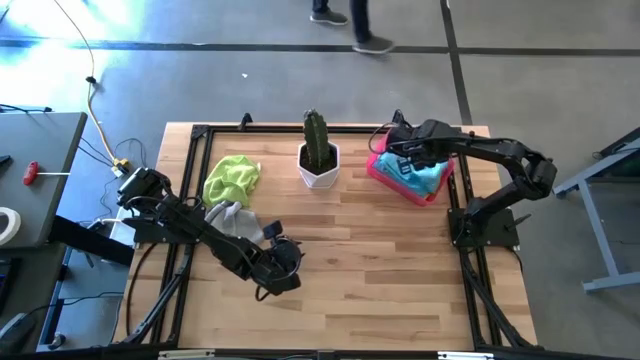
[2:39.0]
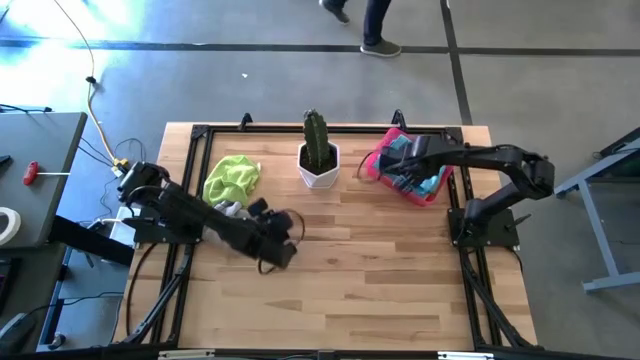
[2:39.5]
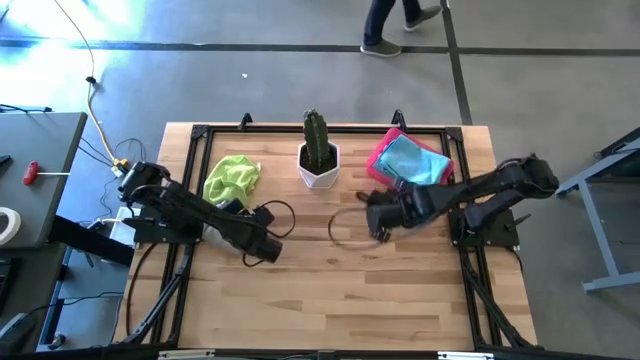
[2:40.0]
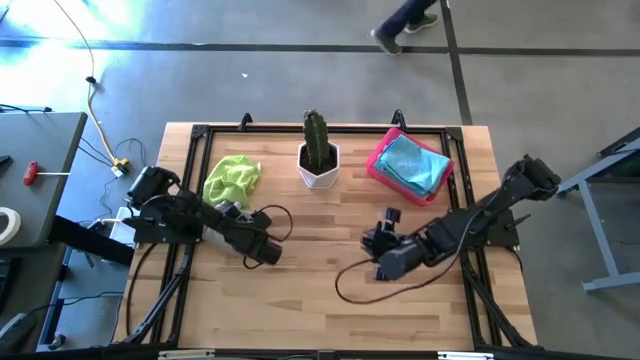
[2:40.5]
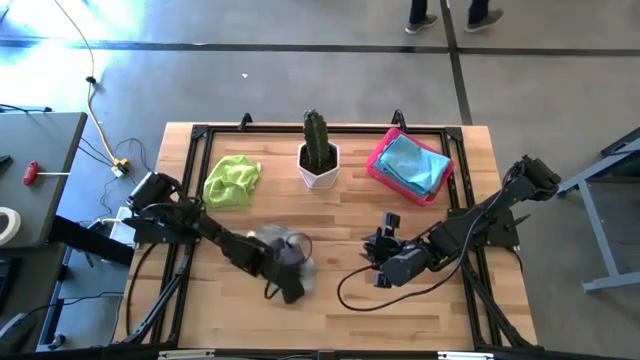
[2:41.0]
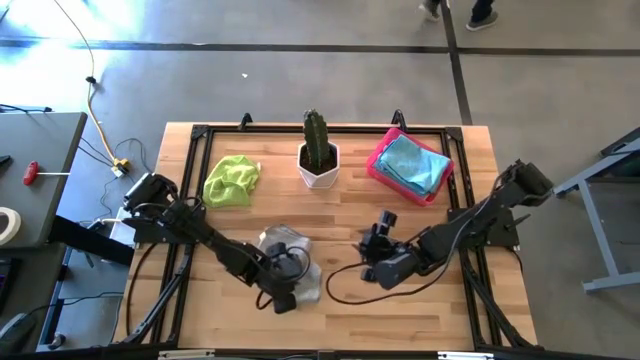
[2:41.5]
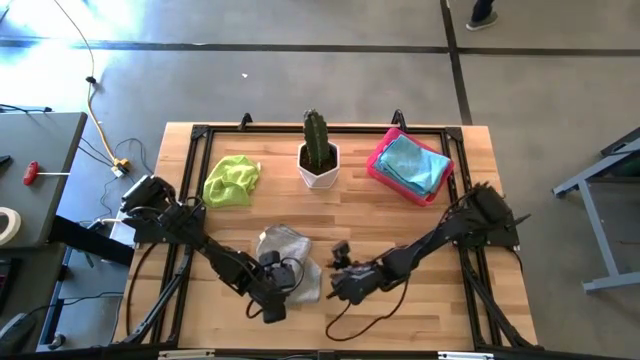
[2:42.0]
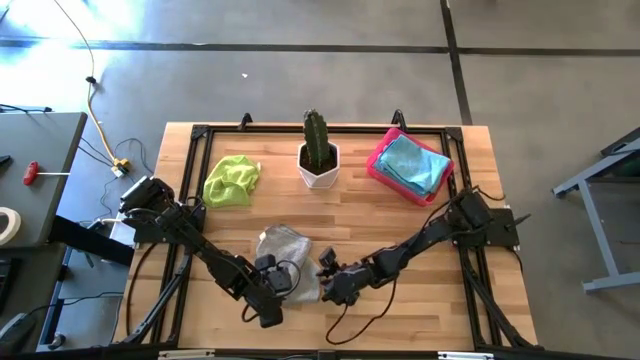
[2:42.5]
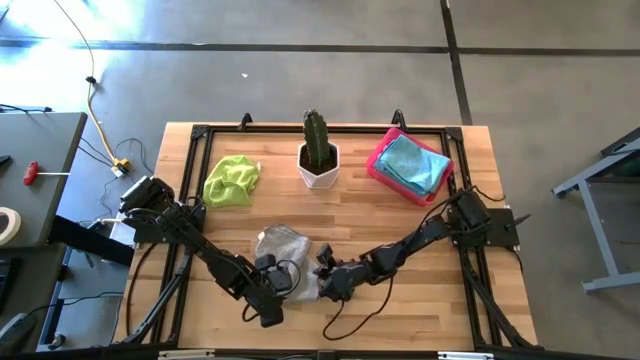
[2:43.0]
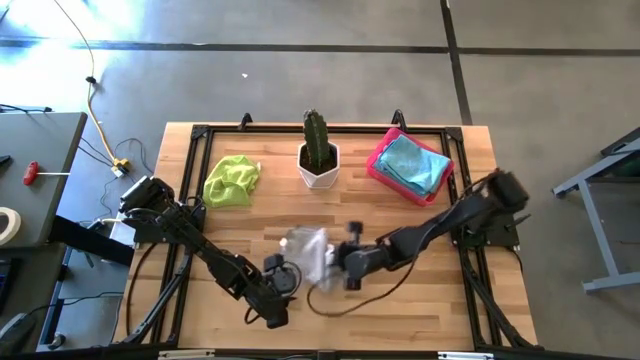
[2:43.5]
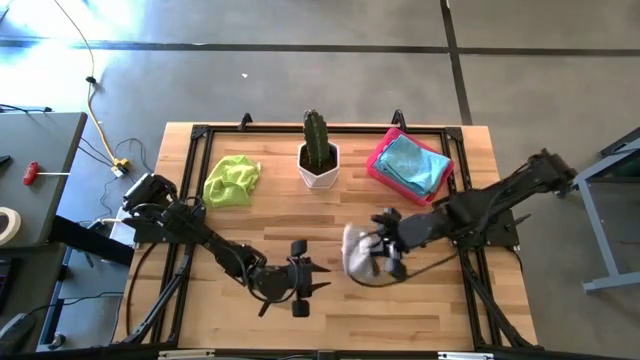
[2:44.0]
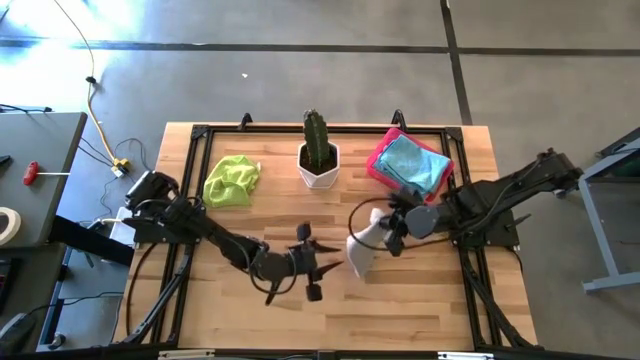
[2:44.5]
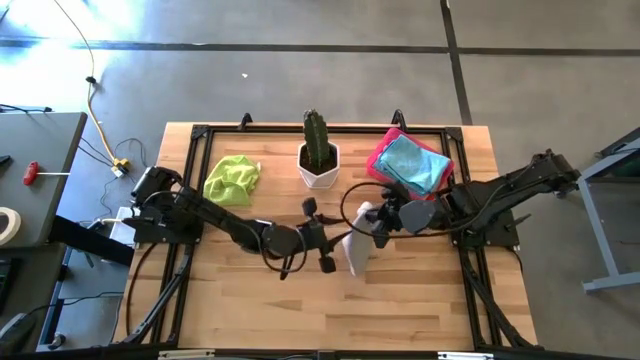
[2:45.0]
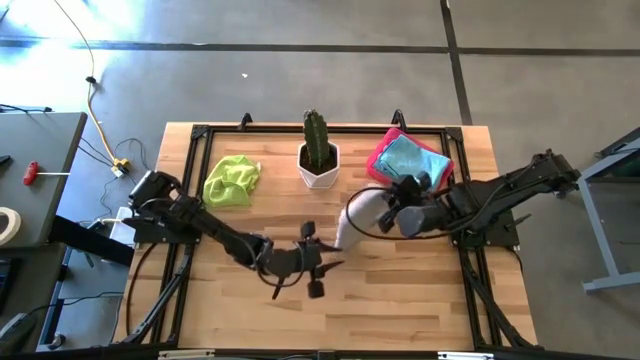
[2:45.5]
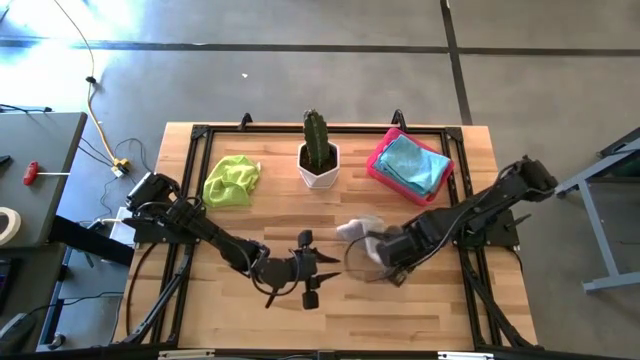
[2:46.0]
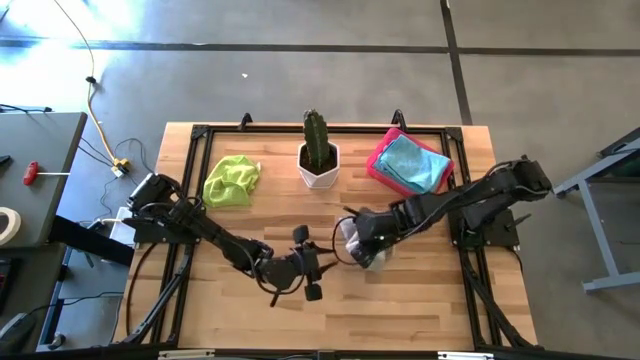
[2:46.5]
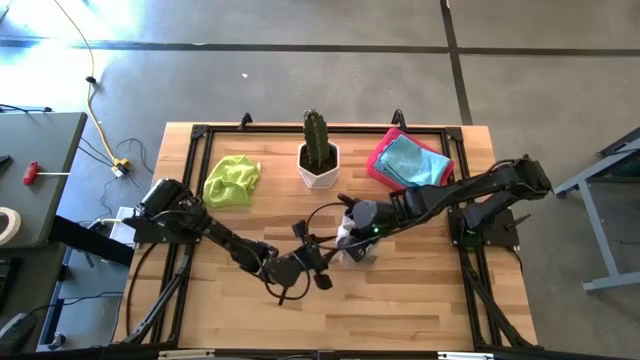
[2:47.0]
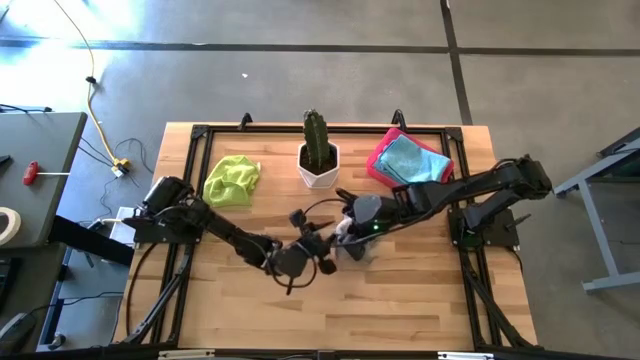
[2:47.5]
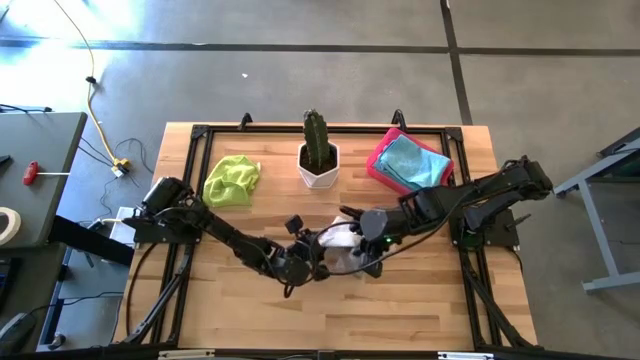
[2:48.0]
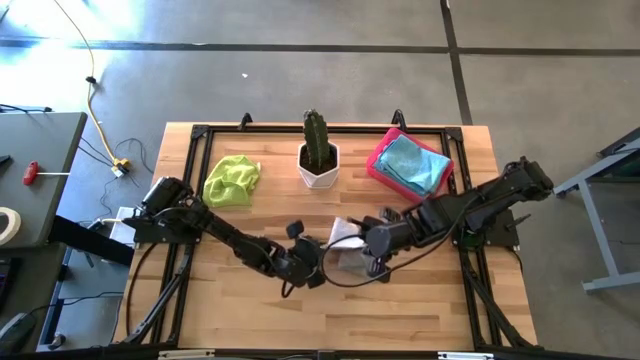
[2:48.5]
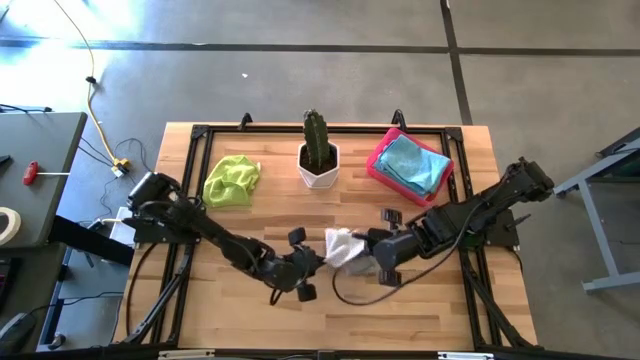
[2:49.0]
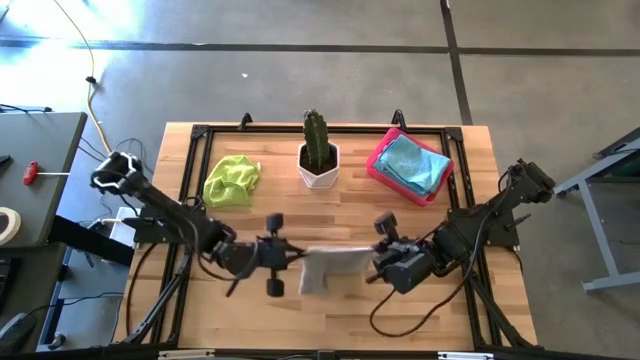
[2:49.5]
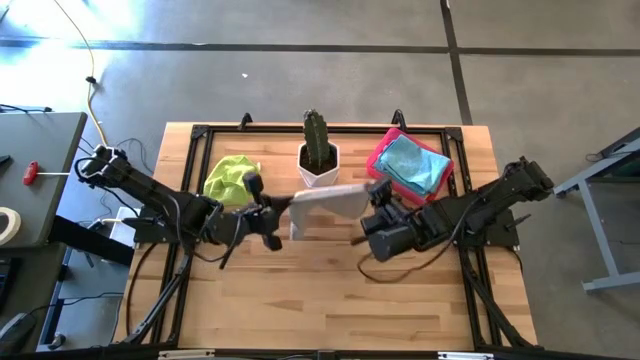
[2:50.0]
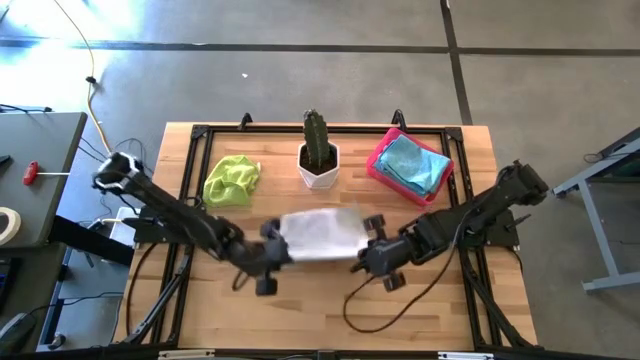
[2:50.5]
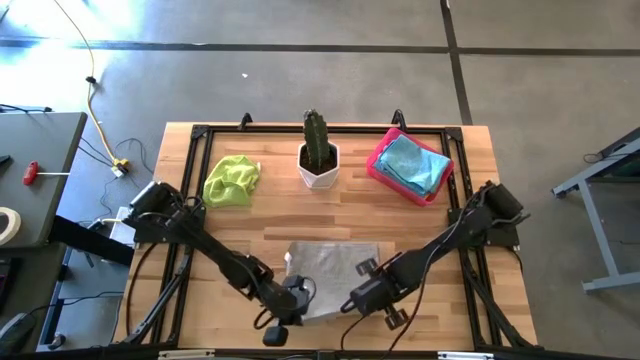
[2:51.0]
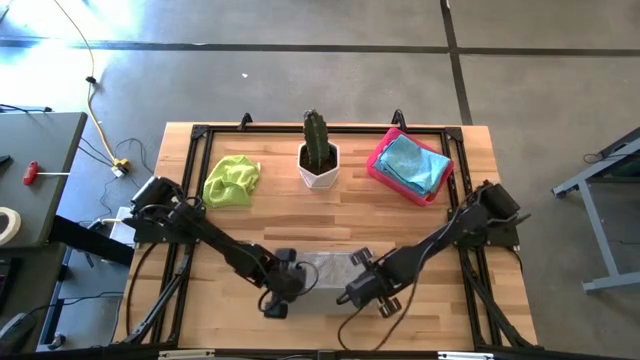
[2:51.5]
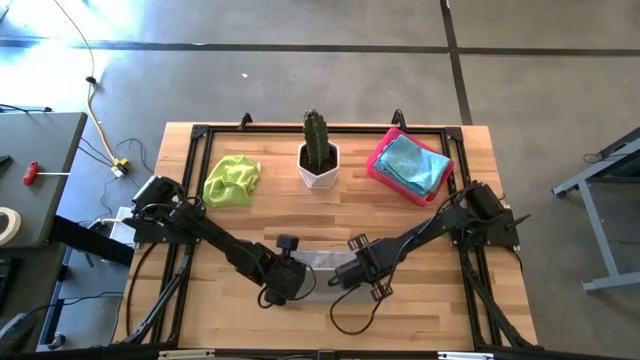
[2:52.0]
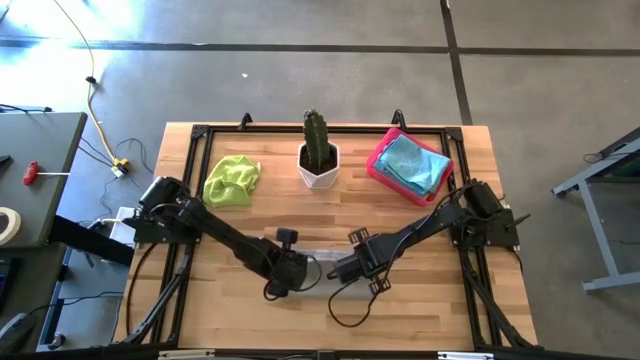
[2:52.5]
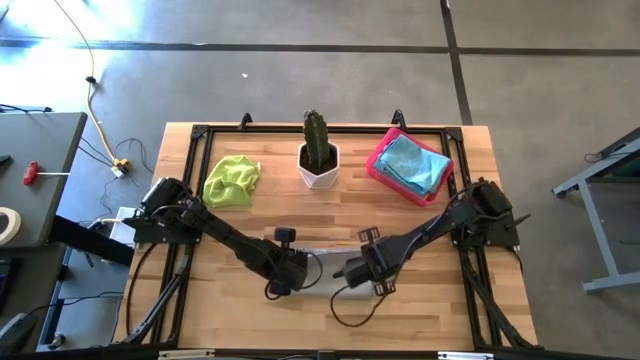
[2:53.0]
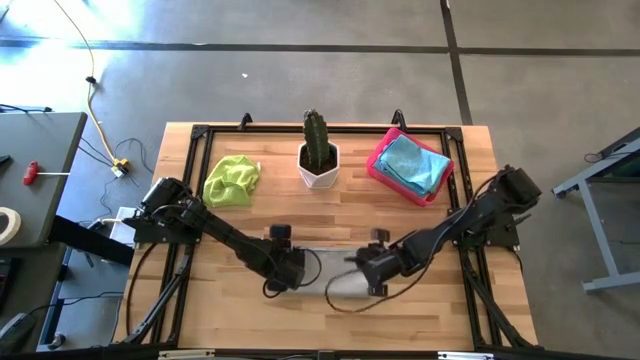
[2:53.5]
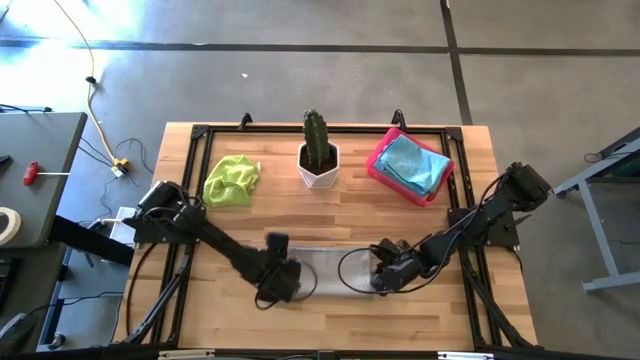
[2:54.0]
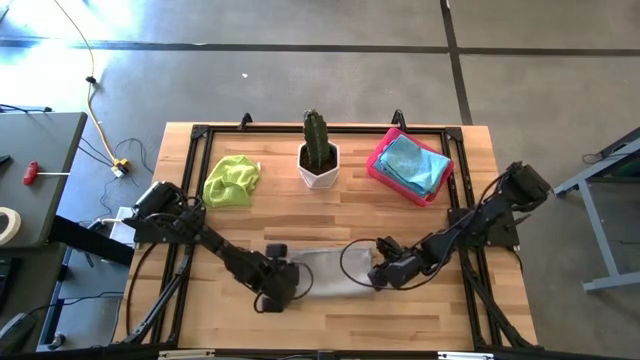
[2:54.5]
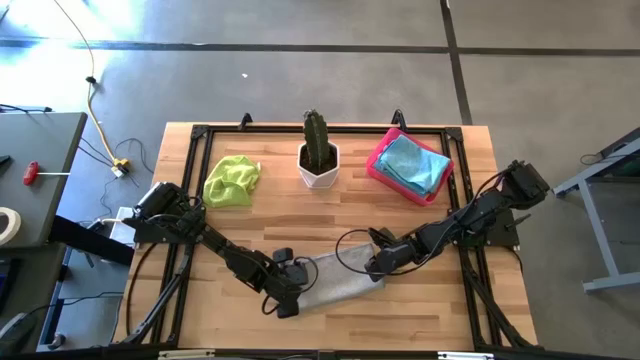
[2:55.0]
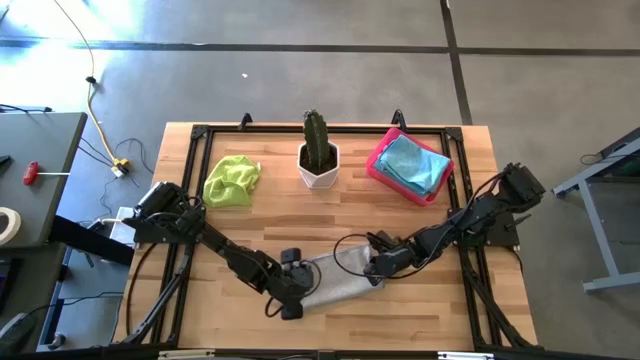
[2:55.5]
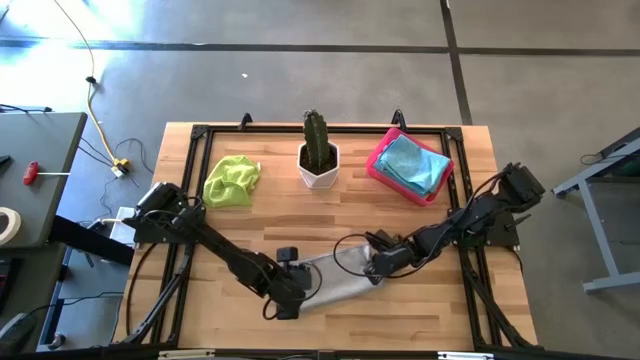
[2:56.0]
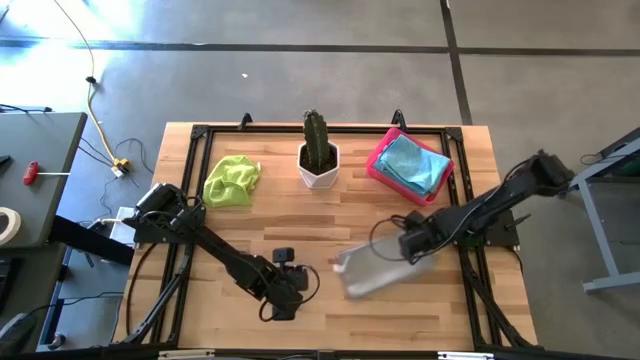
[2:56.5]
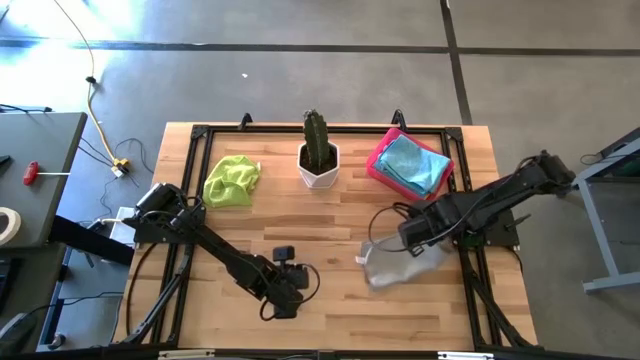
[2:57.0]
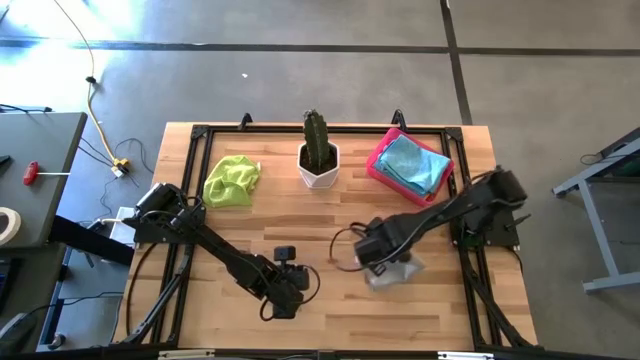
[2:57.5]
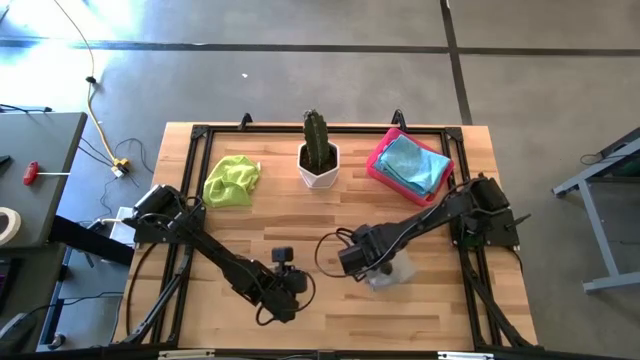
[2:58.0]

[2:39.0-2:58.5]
Task: Fold microfiber towels
Fold the gray microfiber towel

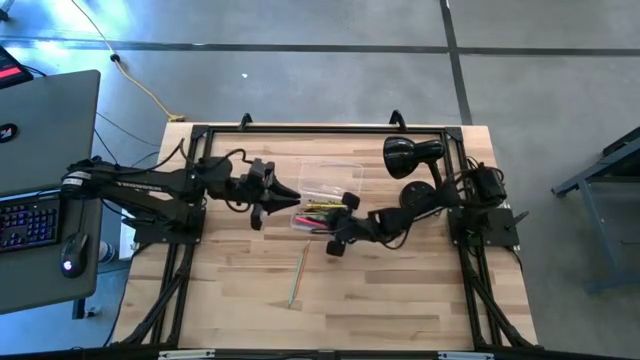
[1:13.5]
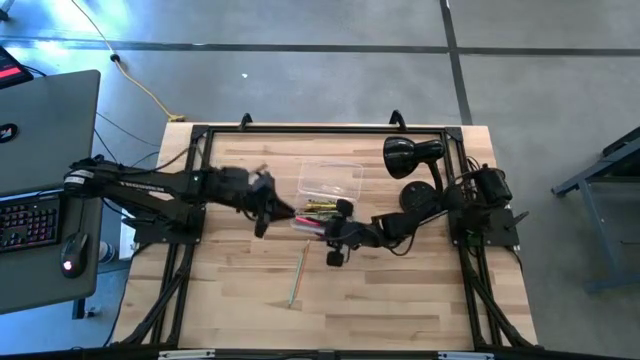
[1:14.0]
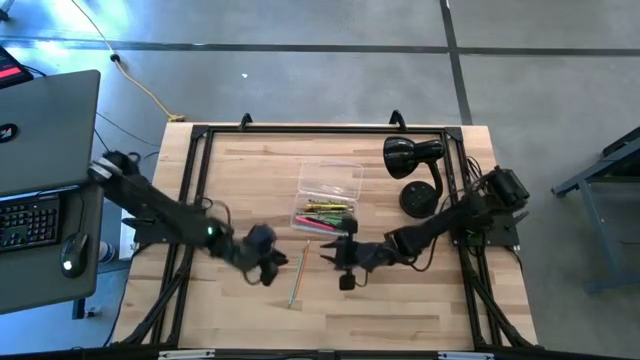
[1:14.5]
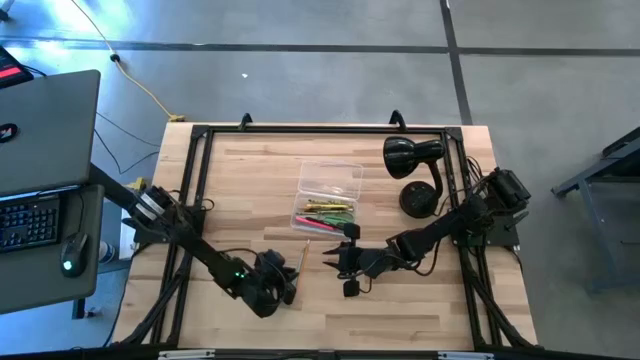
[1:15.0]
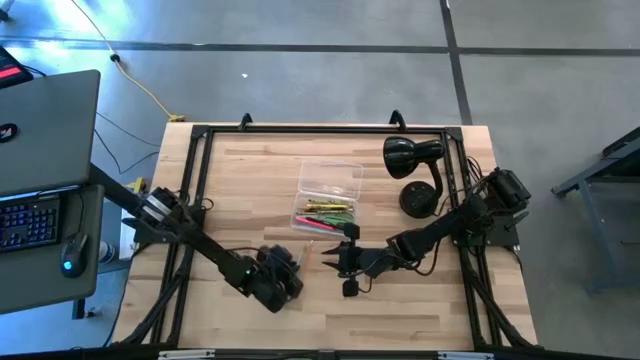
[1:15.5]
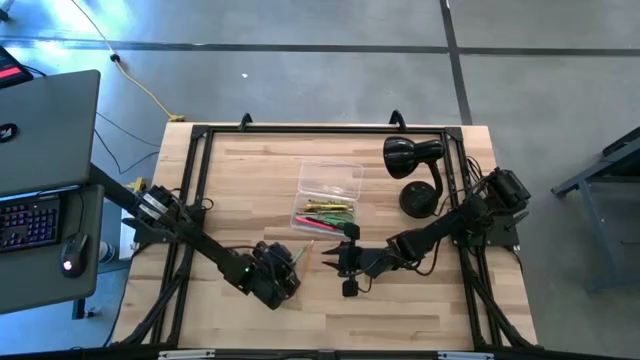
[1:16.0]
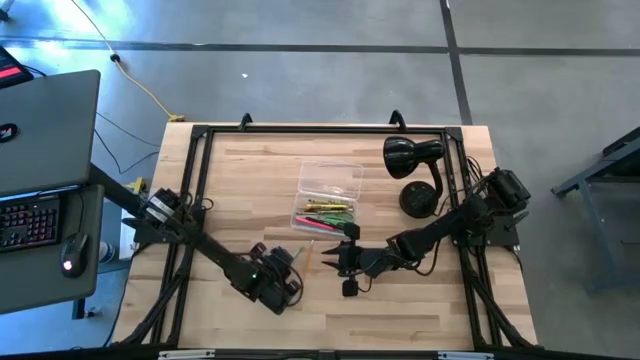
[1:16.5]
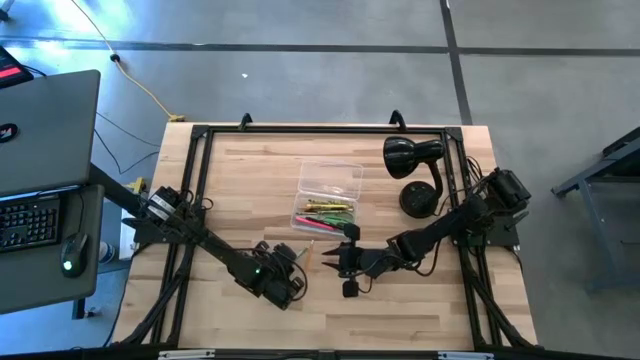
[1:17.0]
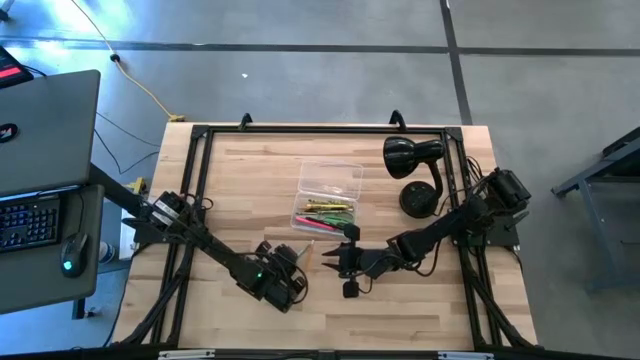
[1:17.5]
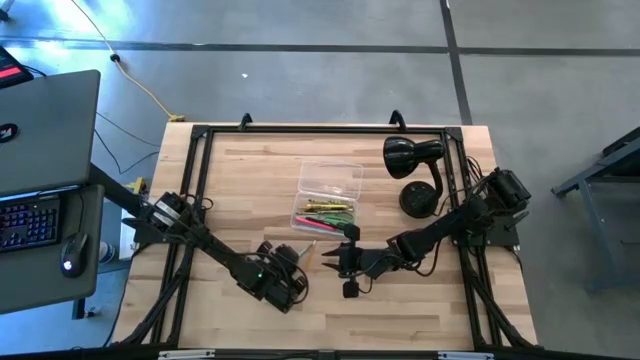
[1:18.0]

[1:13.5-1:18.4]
Task: Pick & place school supplies into a supply box
Put the light blue pencil into the transparent supply box
